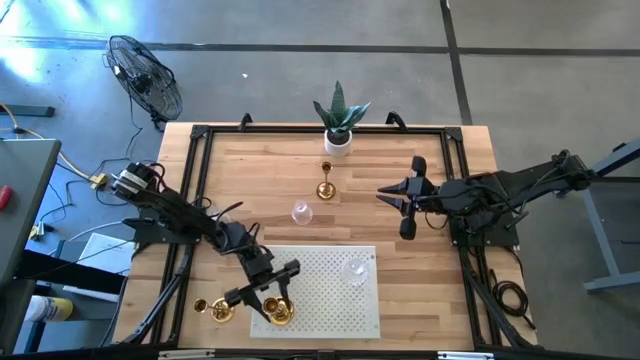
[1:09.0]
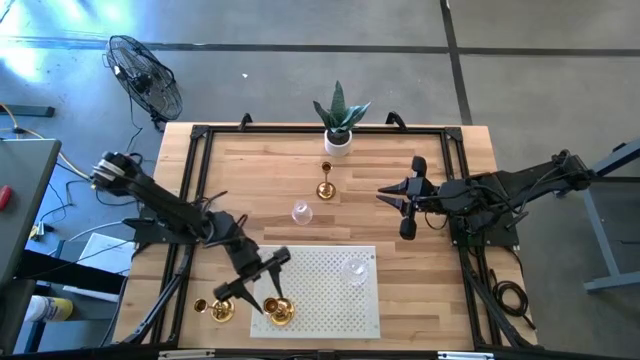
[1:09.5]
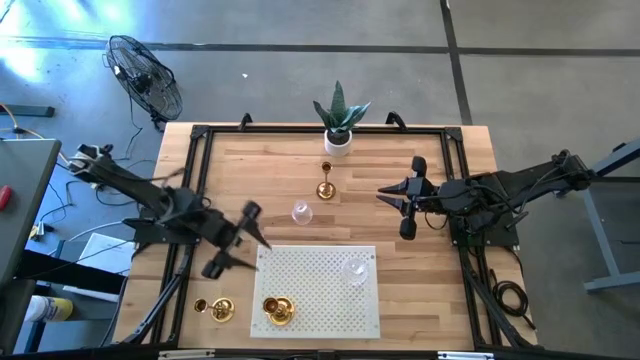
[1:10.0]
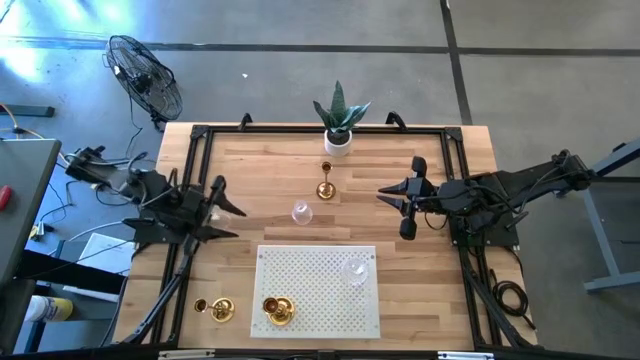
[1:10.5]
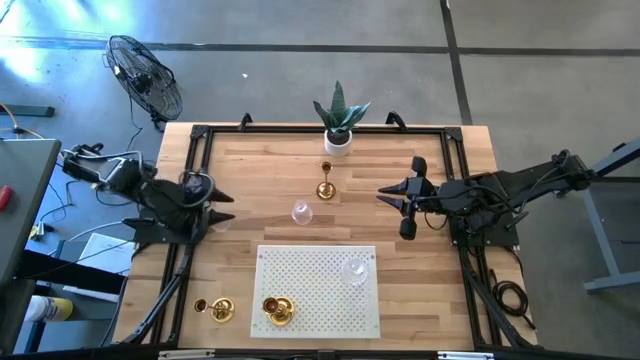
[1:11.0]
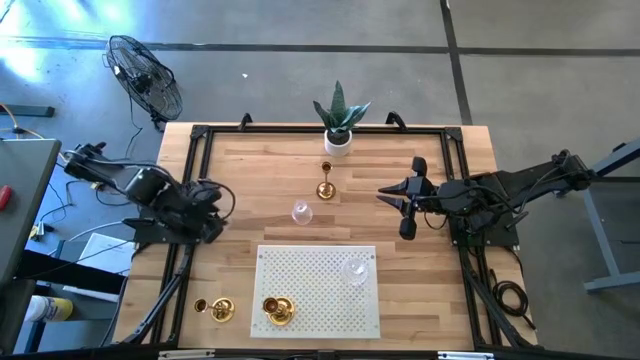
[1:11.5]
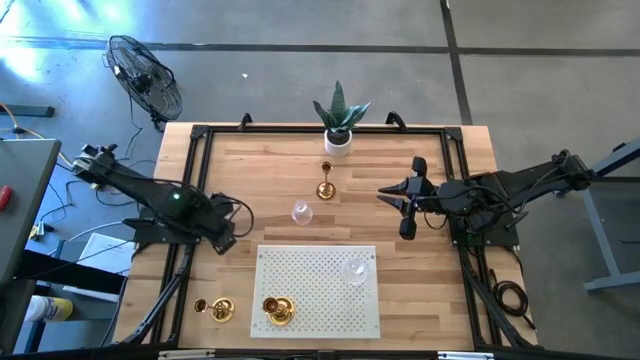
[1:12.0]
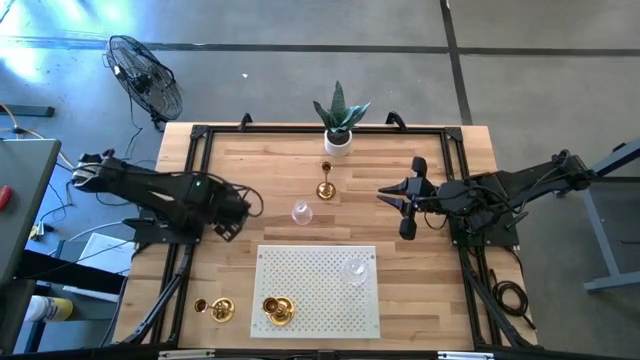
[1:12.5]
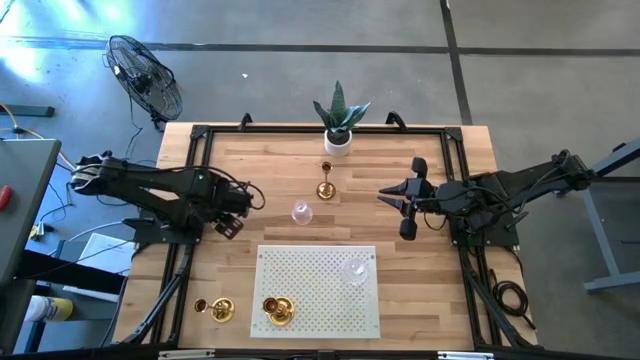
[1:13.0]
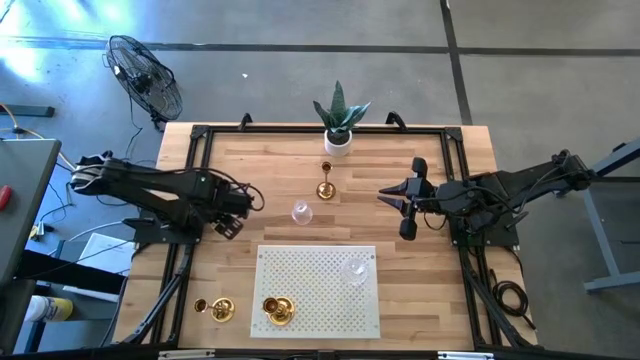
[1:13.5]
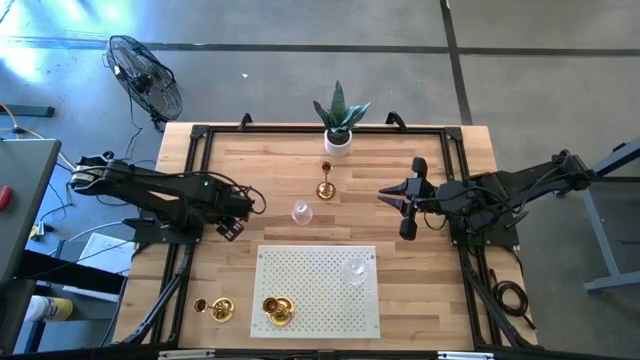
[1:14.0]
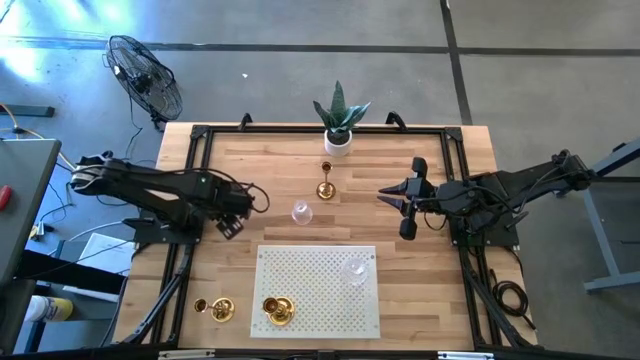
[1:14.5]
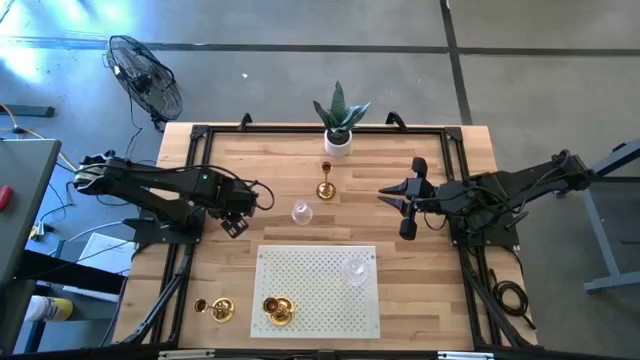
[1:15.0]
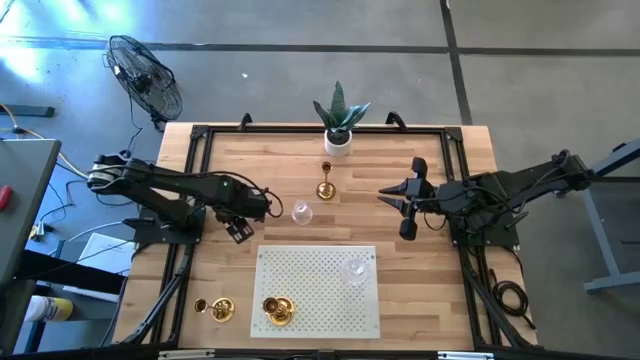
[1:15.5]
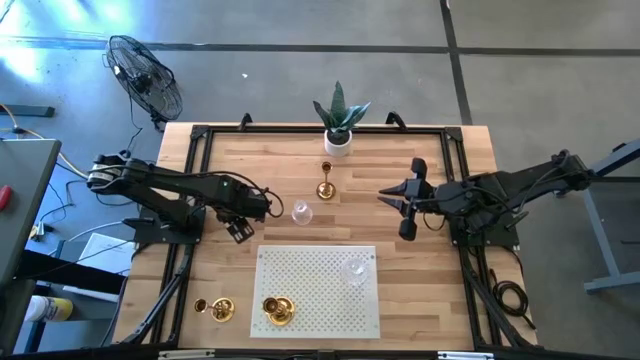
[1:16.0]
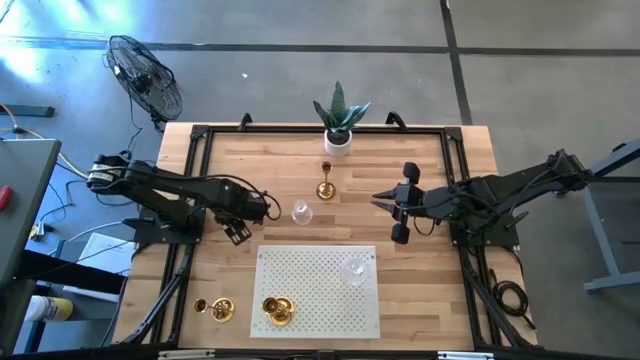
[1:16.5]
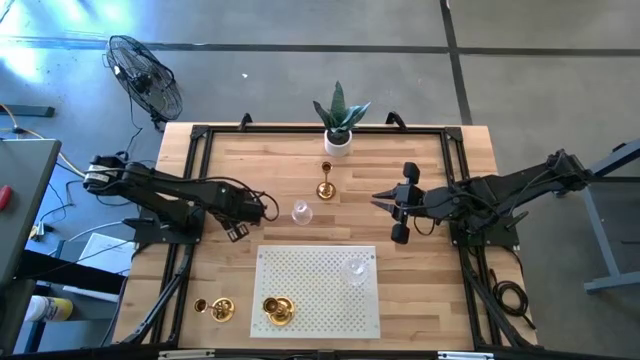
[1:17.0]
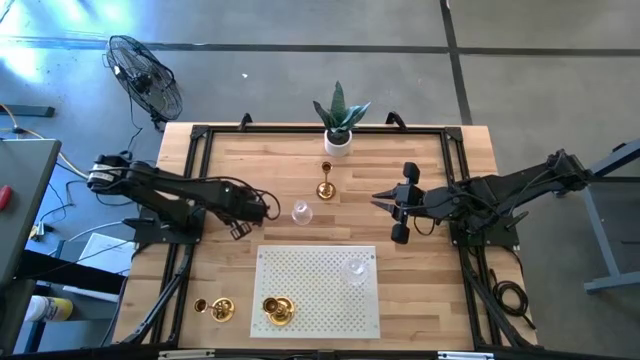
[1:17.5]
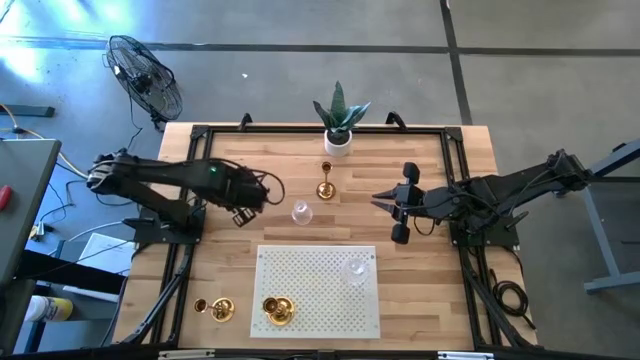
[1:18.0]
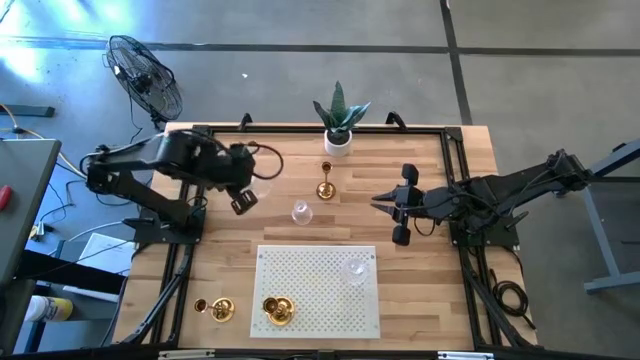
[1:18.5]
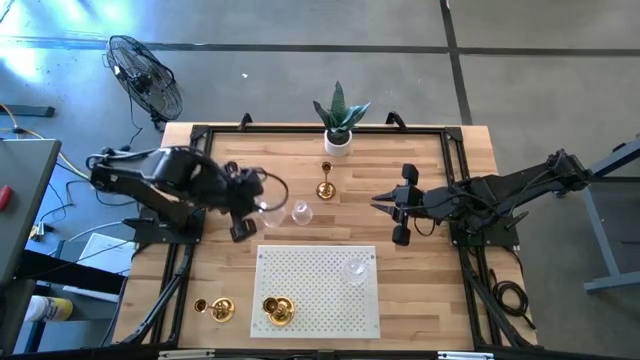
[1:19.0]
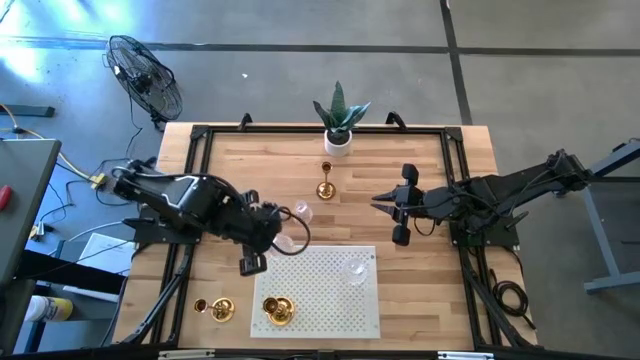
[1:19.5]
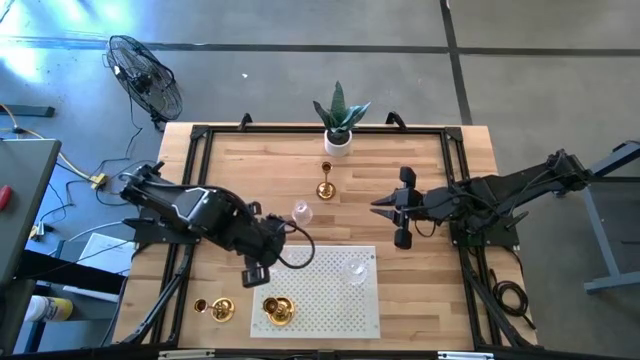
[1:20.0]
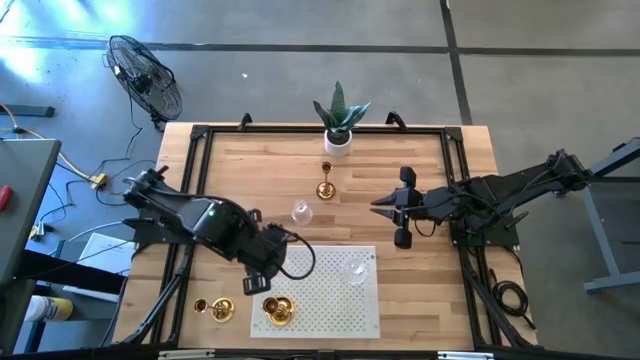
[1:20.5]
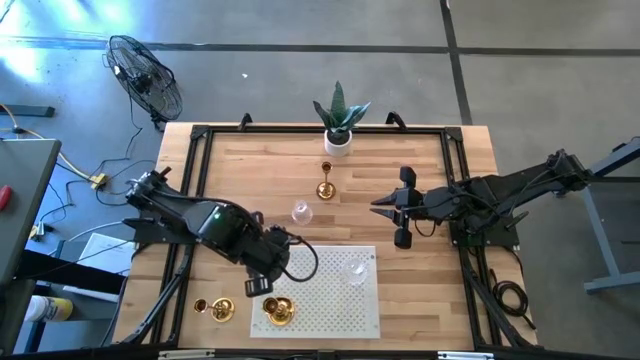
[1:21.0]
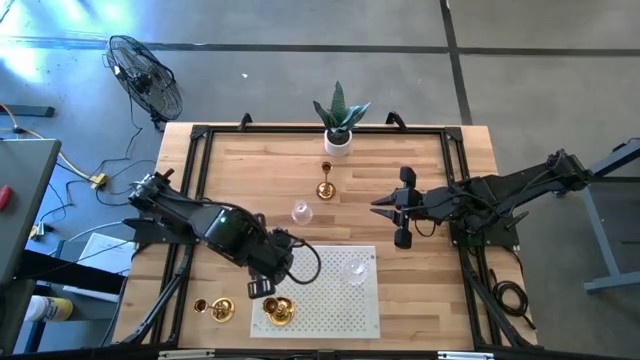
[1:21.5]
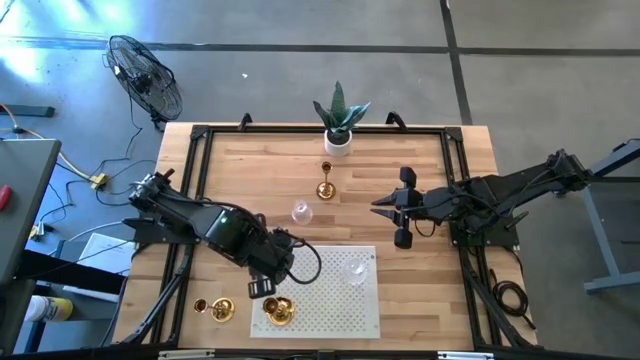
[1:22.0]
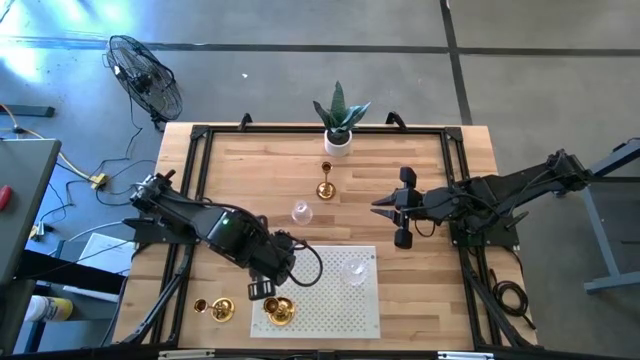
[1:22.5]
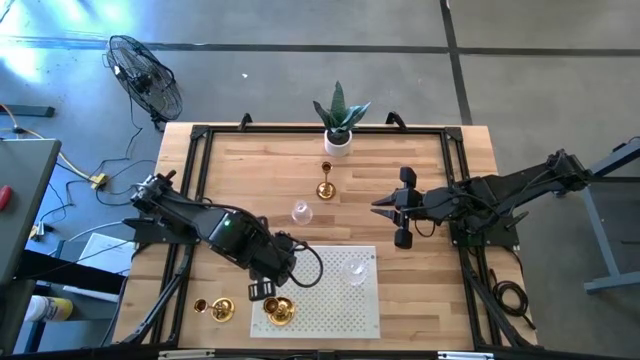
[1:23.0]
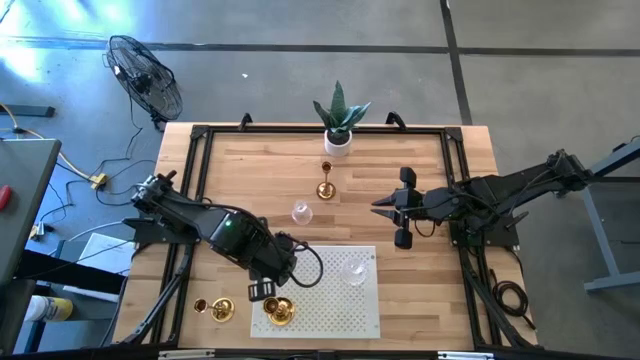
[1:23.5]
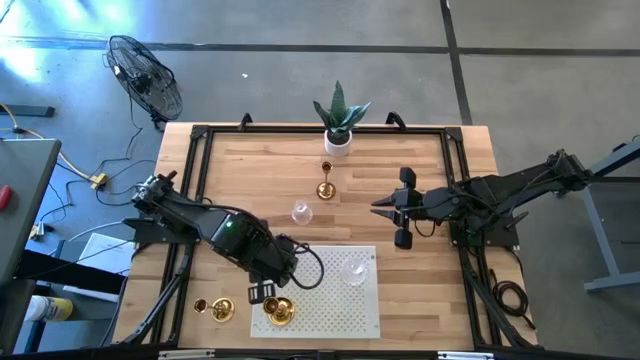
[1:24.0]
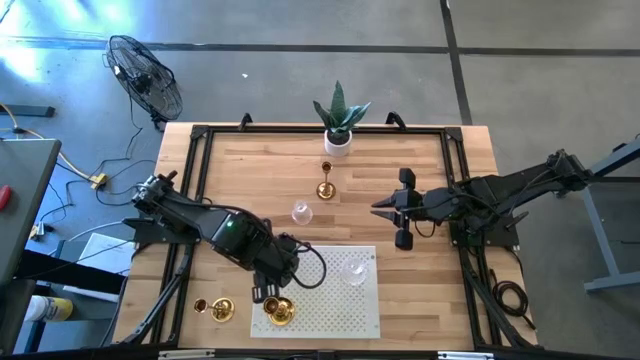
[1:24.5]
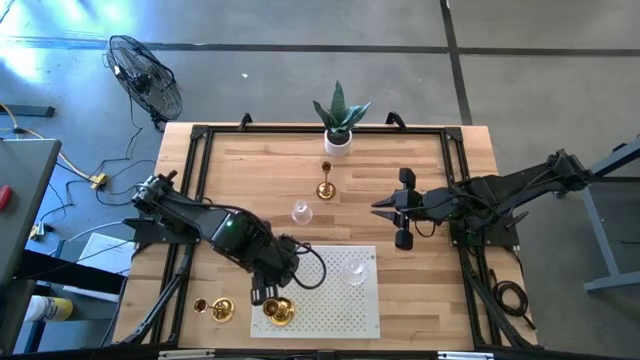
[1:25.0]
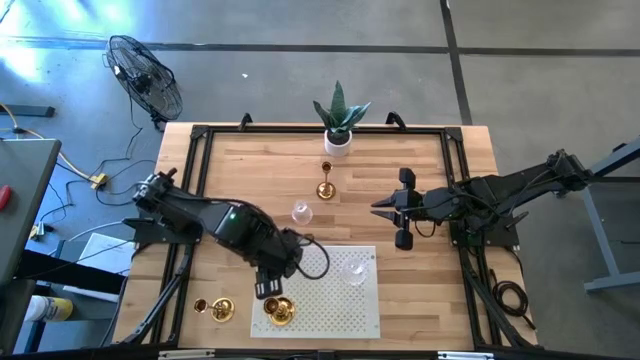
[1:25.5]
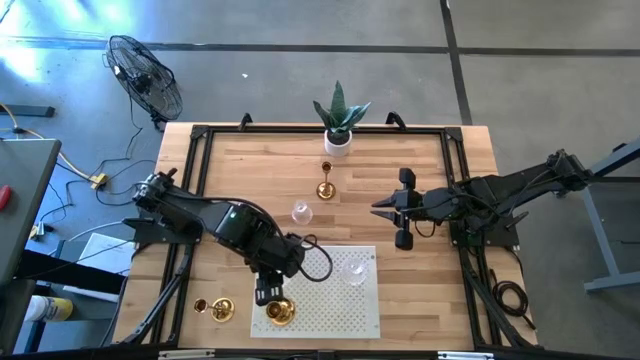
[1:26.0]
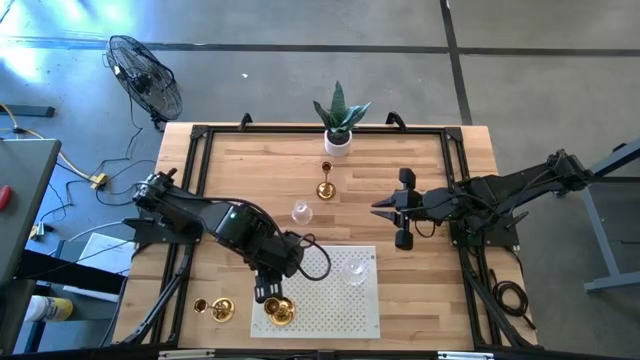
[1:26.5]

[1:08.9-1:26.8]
Task: Pick & Place candle stick holders
Put the left transparent candle holder on the shelf
